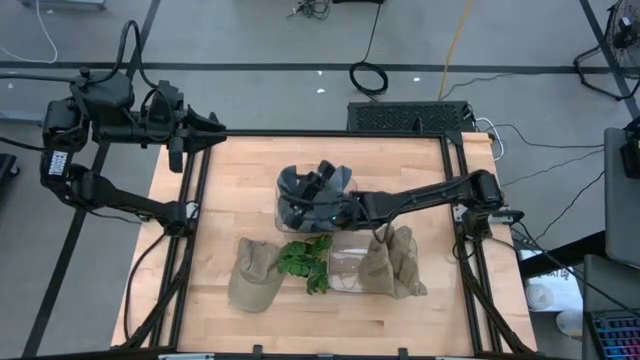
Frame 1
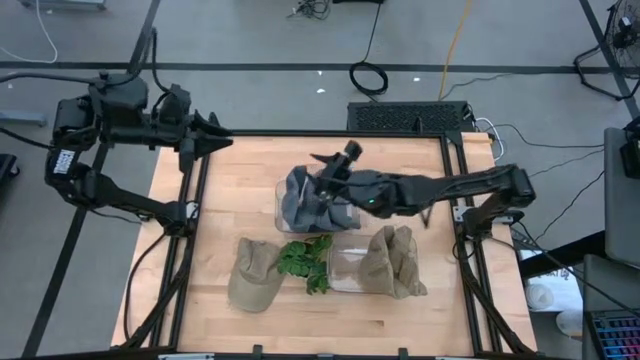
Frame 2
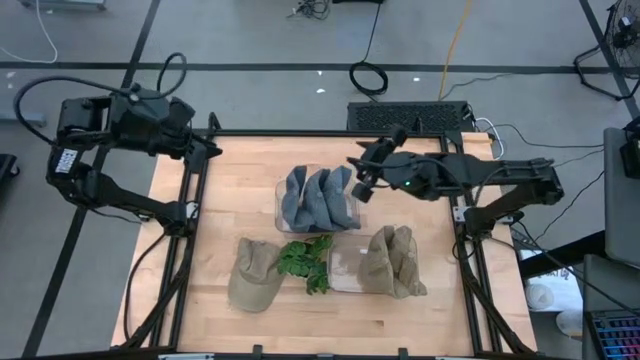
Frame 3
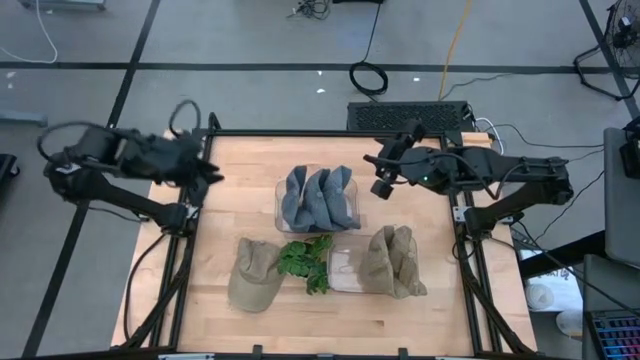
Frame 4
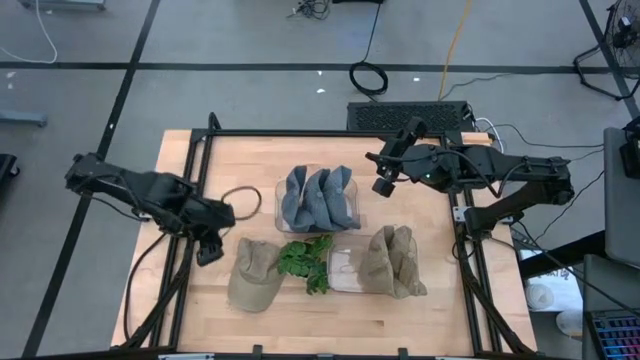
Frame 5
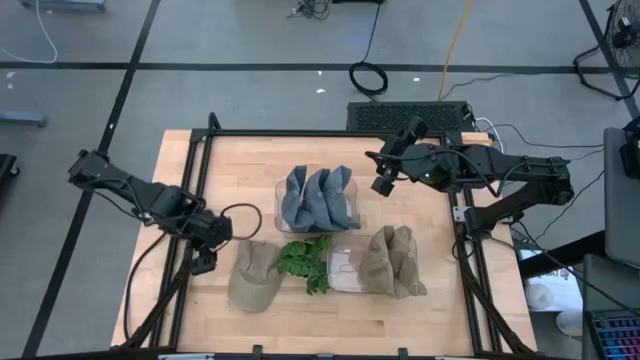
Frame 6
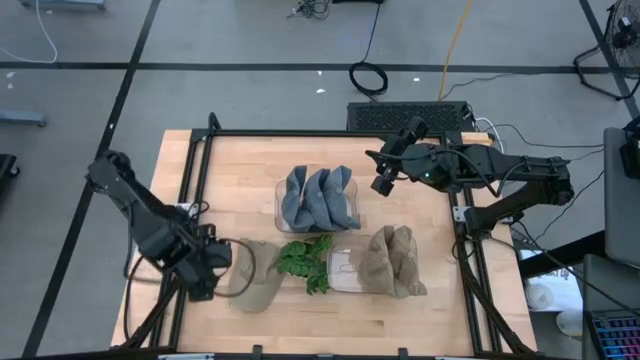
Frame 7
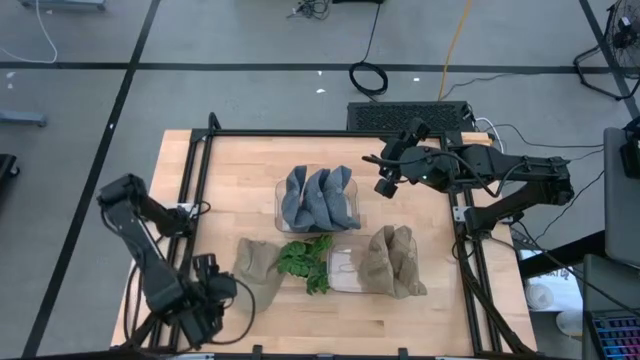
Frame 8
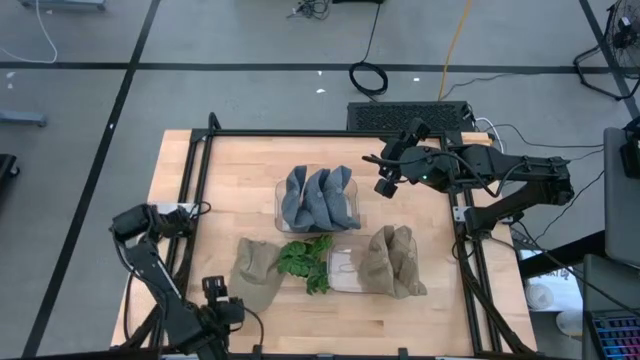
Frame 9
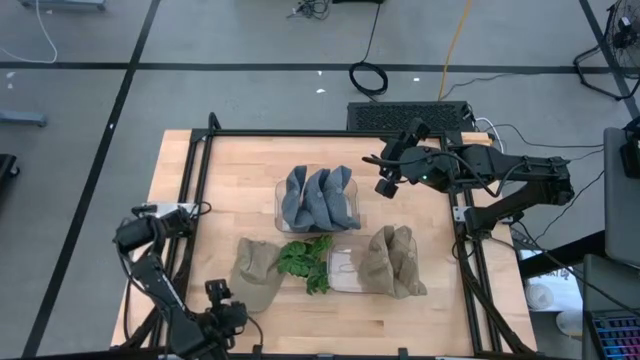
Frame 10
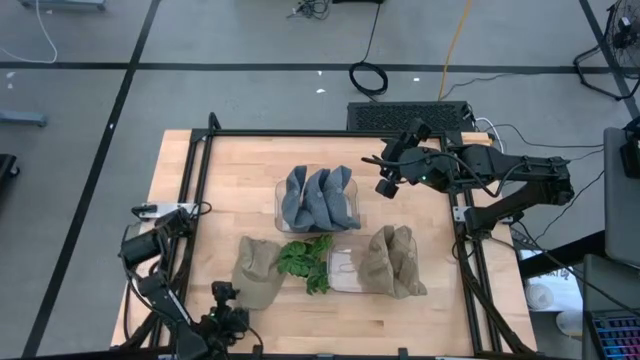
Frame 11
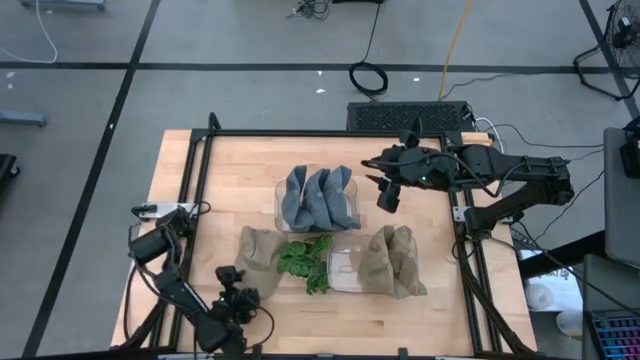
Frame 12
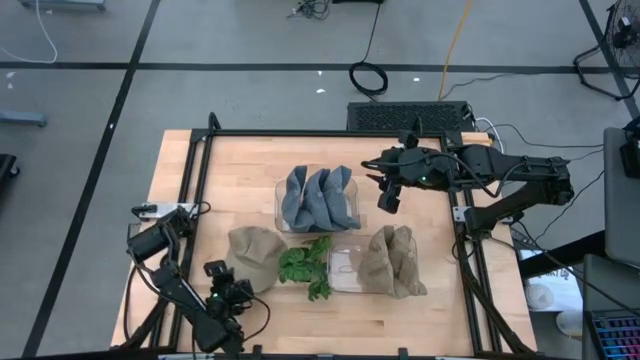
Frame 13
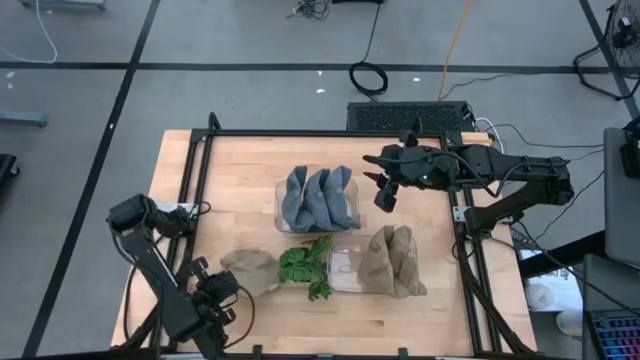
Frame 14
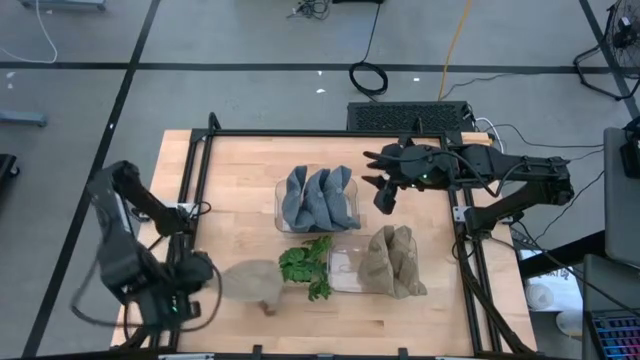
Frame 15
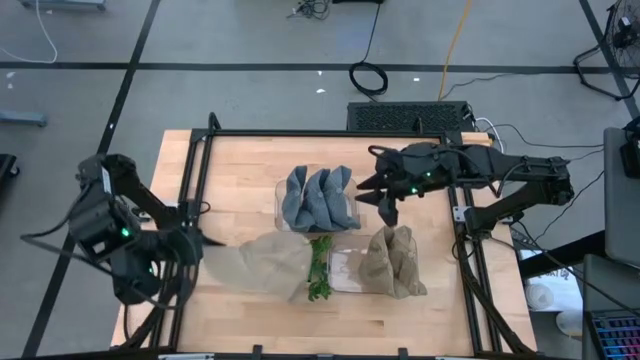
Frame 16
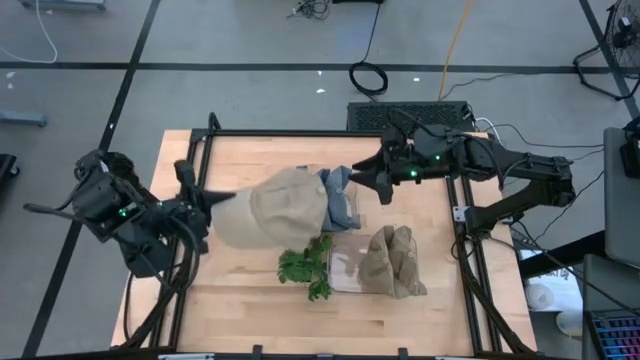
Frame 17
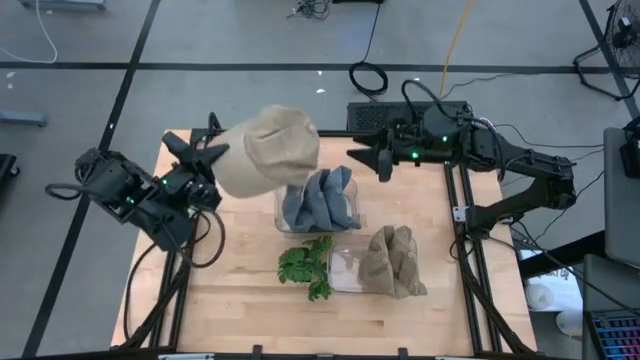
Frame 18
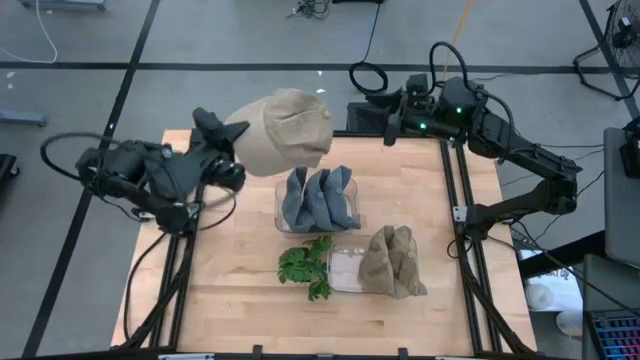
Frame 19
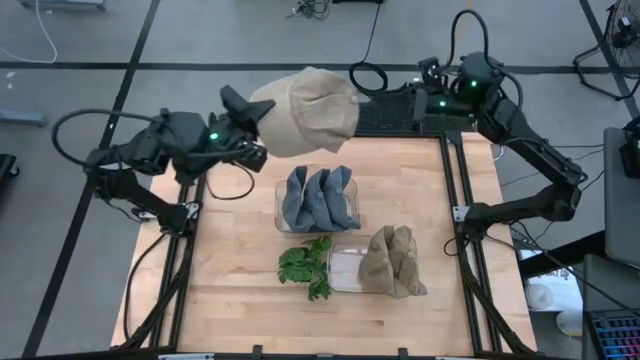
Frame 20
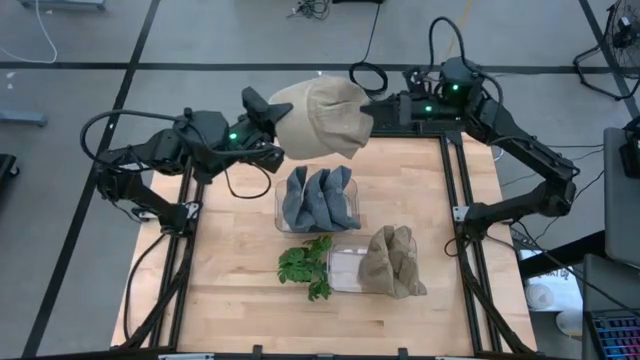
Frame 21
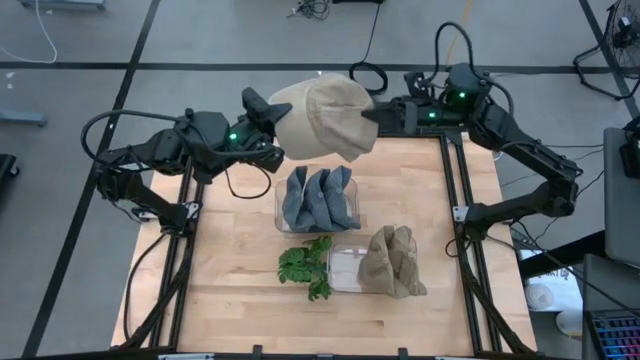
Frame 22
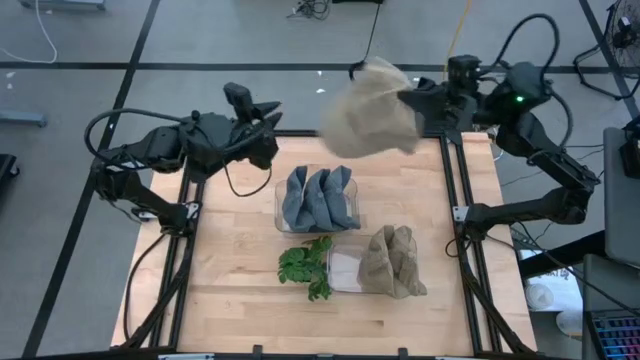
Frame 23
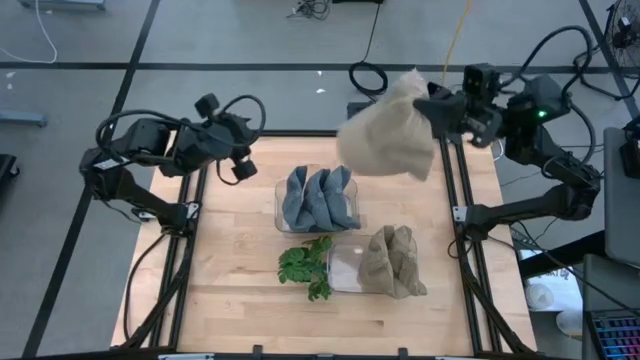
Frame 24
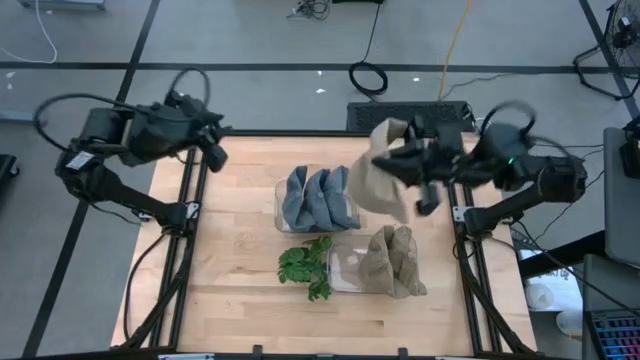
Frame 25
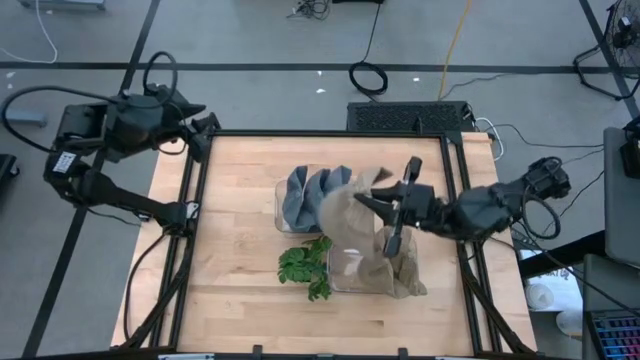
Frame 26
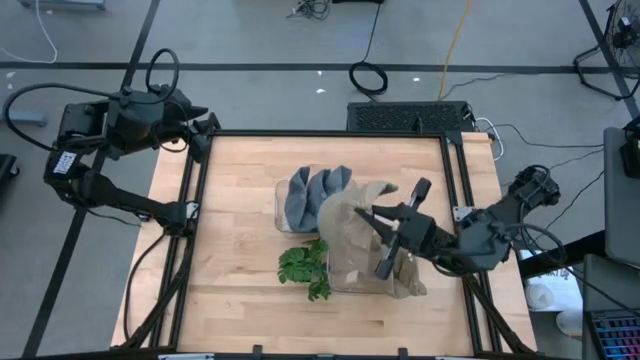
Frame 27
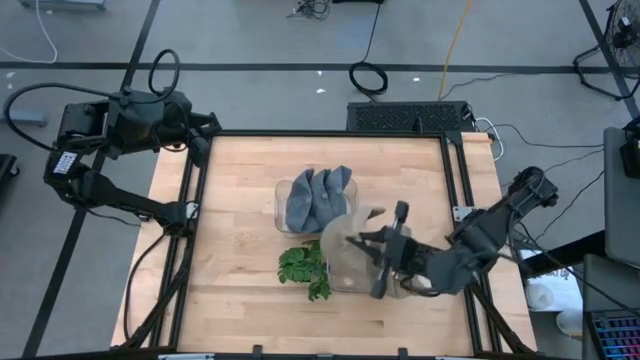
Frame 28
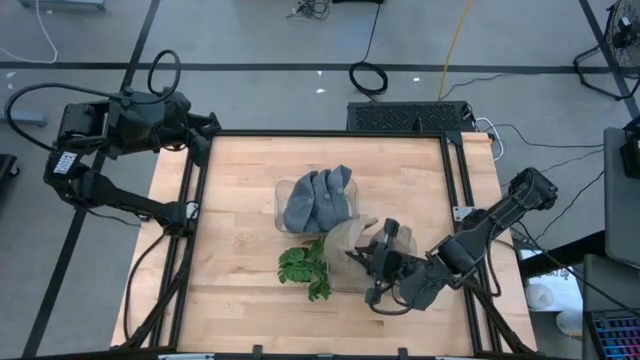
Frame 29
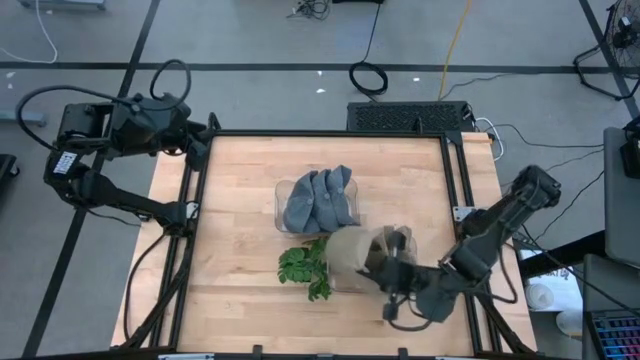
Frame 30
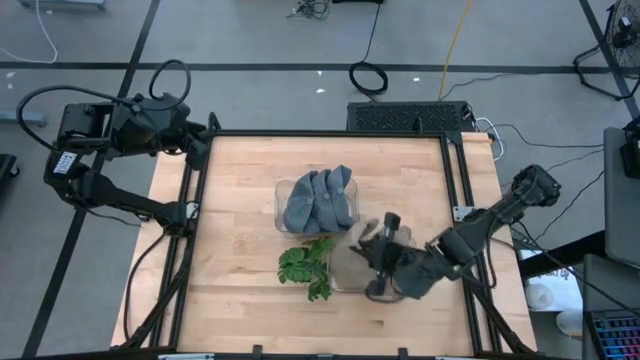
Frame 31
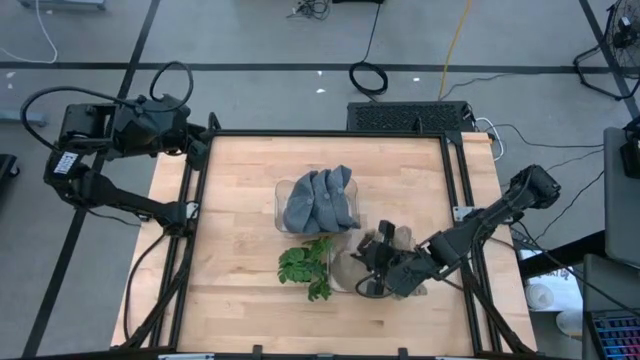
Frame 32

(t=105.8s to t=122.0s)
Task: Pick & Place hat
Put the brown cap into the bottom transparent bin

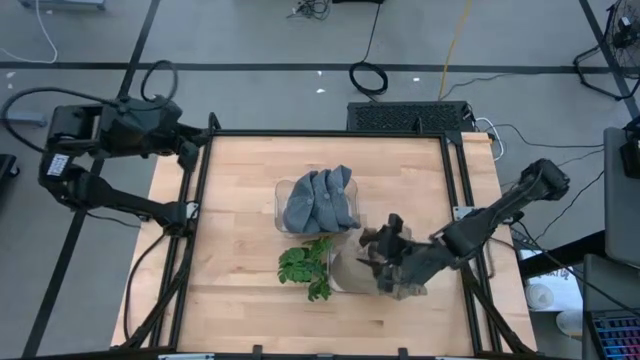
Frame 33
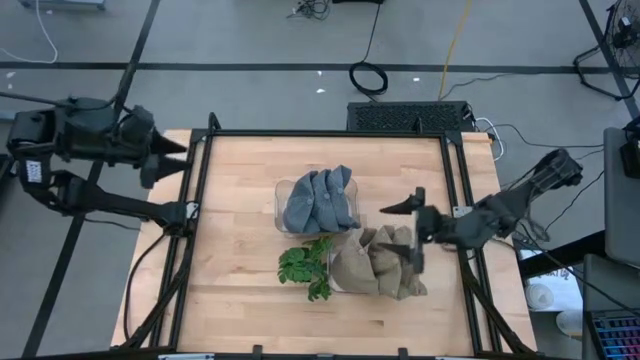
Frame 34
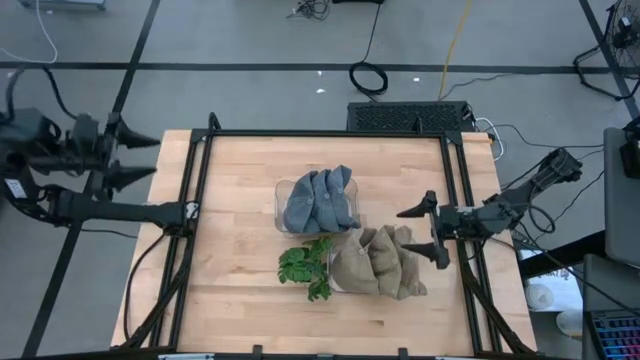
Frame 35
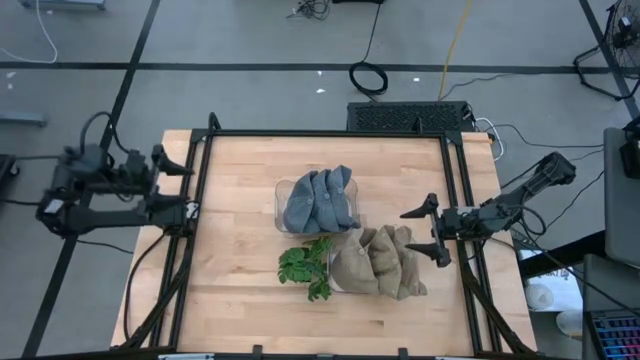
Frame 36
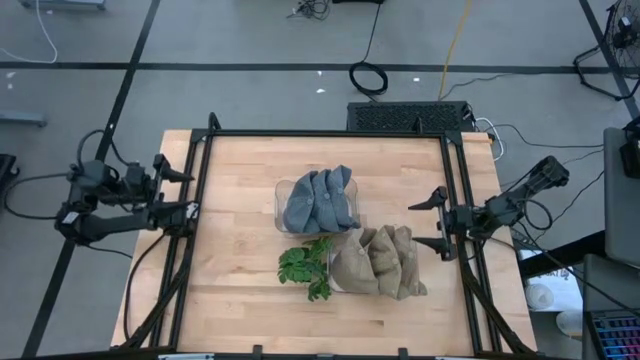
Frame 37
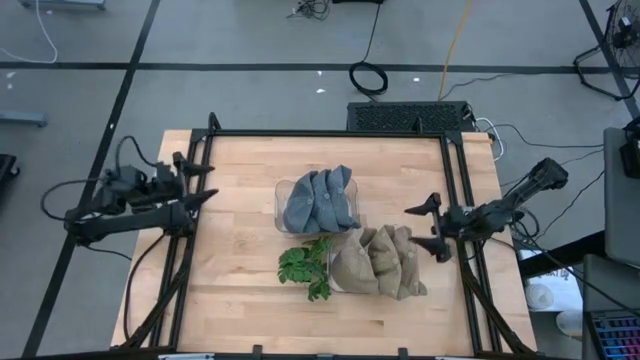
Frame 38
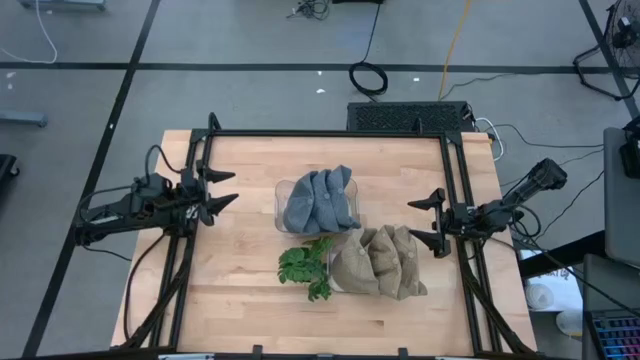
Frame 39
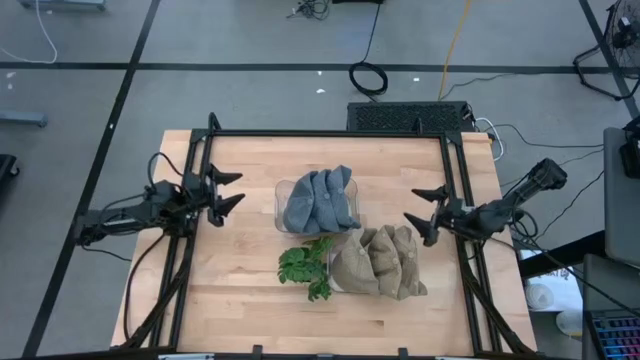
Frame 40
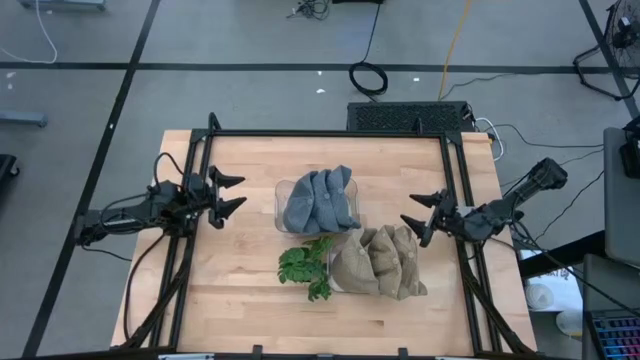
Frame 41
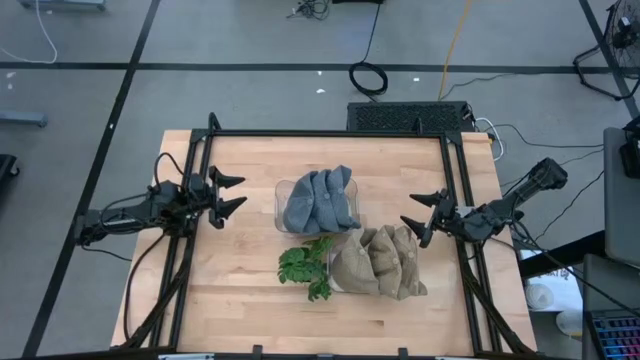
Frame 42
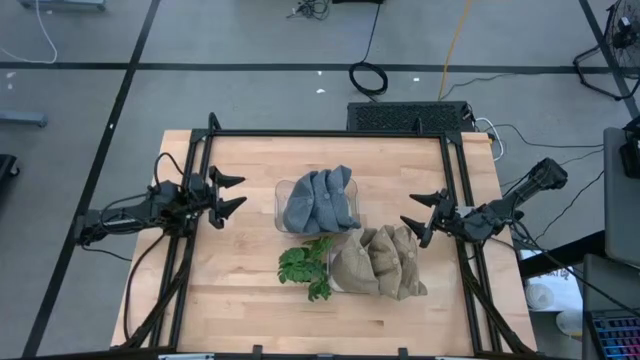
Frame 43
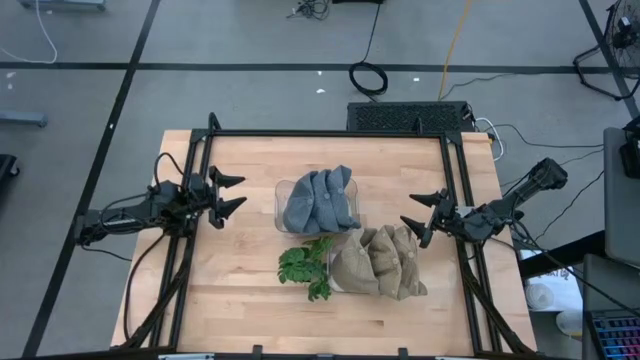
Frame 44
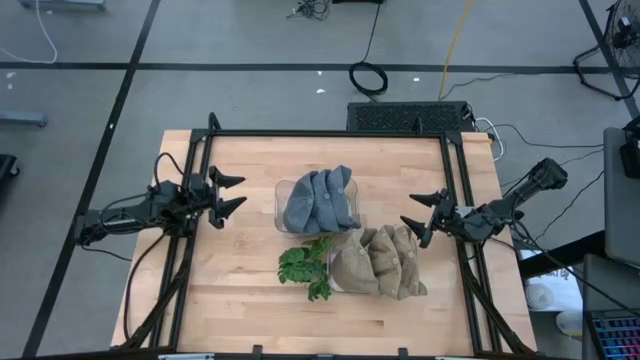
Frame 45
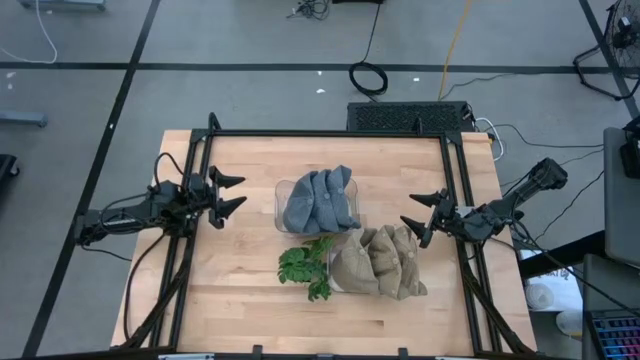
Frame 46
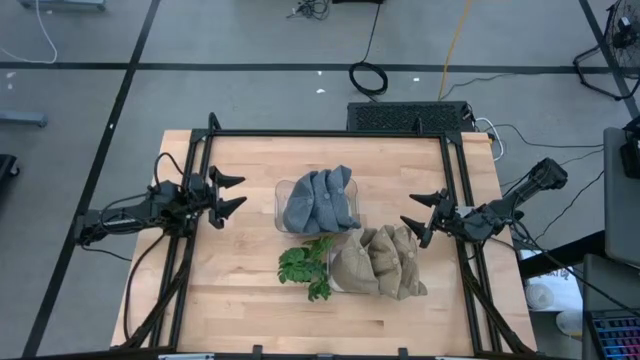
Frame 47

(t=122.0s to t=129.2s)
Return to Home Position
